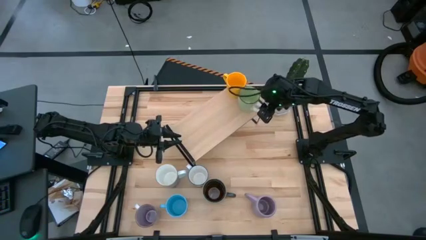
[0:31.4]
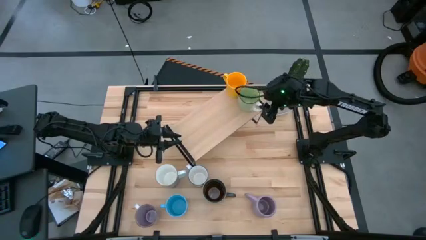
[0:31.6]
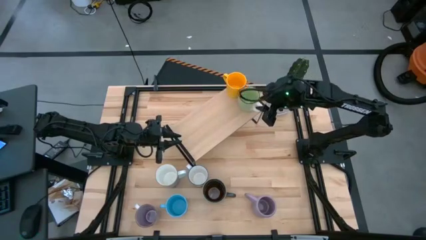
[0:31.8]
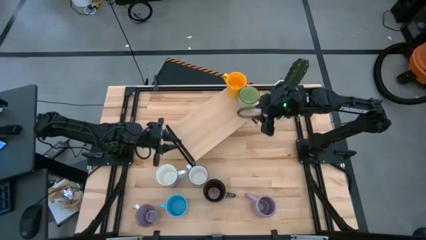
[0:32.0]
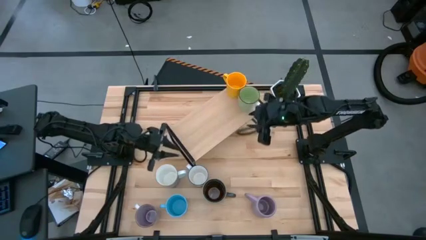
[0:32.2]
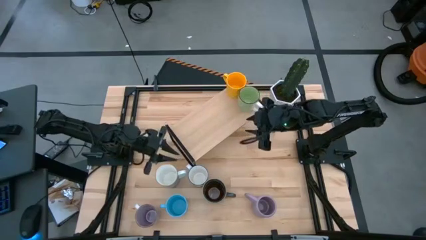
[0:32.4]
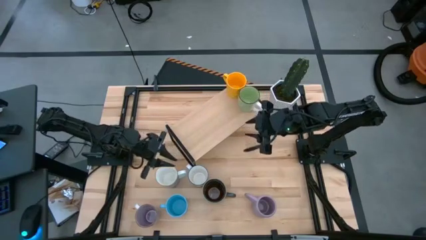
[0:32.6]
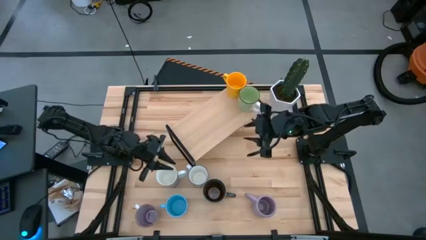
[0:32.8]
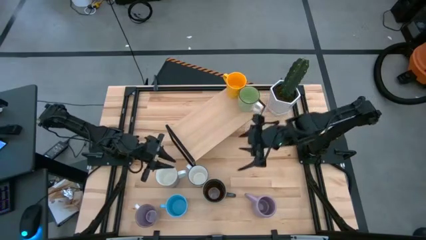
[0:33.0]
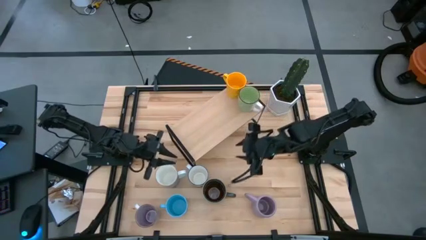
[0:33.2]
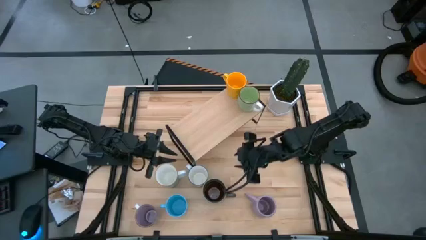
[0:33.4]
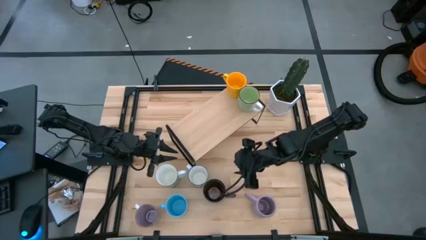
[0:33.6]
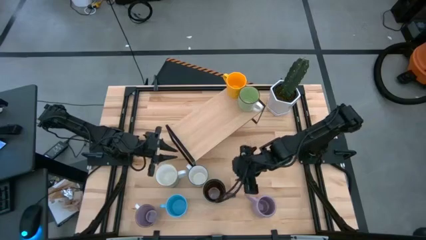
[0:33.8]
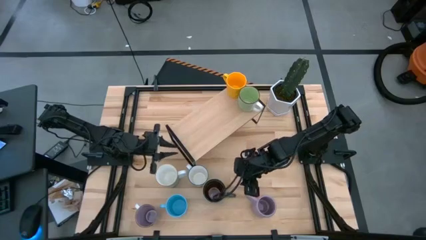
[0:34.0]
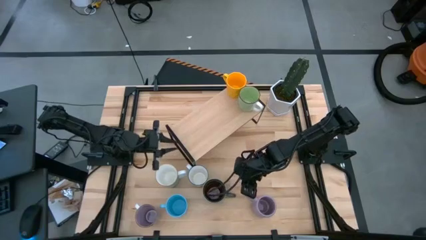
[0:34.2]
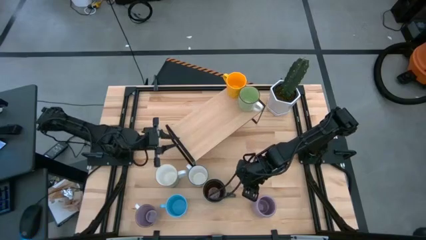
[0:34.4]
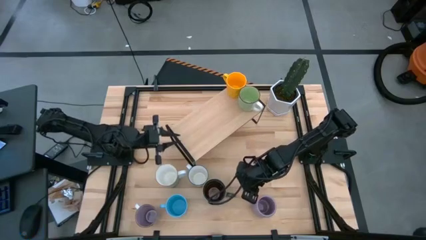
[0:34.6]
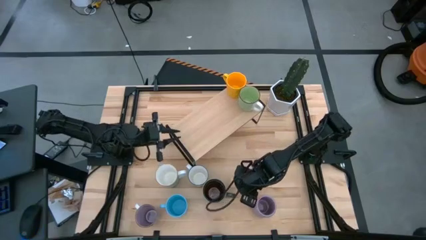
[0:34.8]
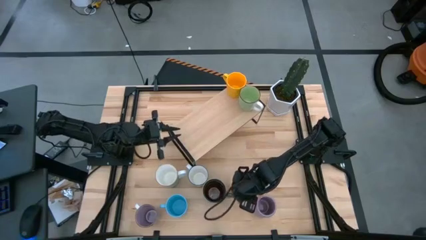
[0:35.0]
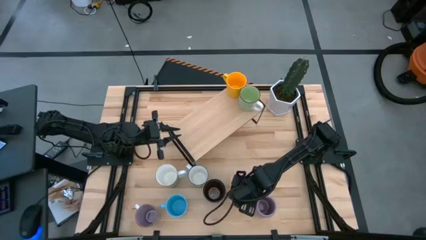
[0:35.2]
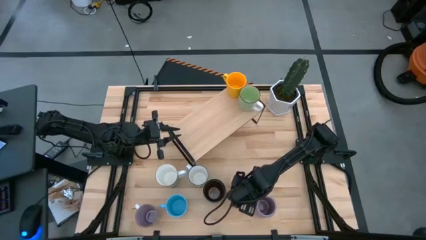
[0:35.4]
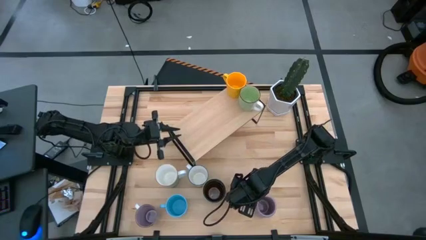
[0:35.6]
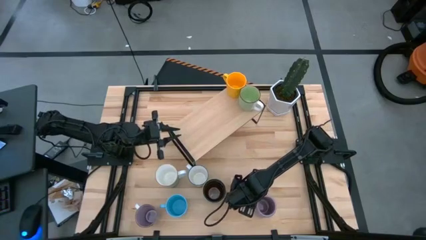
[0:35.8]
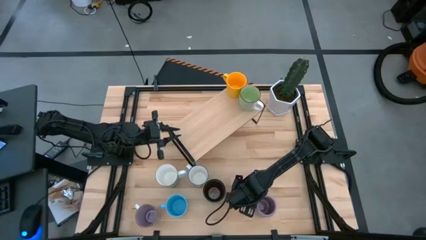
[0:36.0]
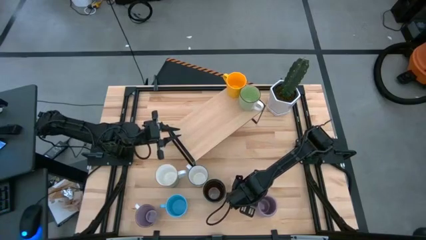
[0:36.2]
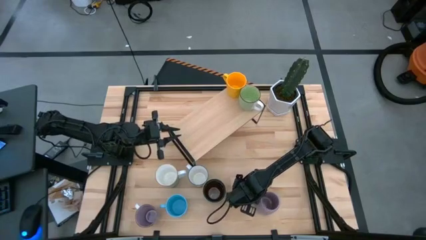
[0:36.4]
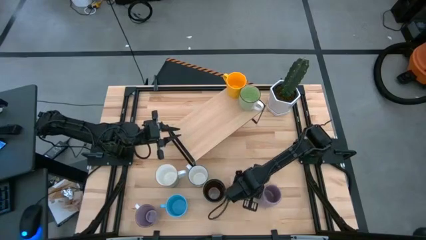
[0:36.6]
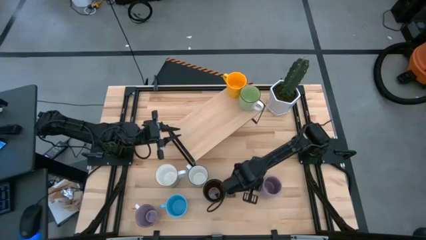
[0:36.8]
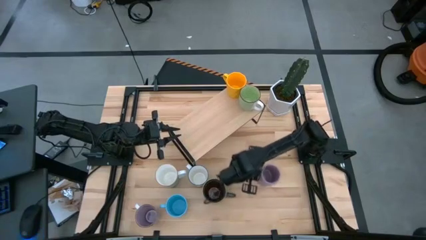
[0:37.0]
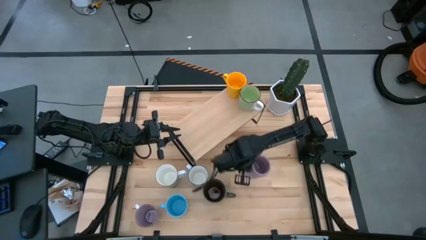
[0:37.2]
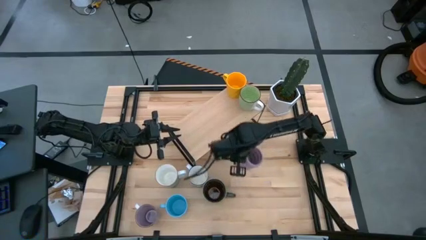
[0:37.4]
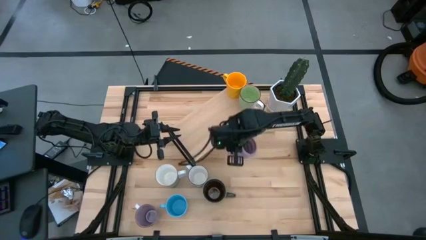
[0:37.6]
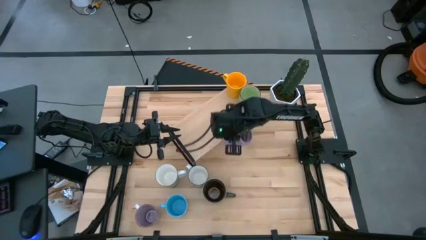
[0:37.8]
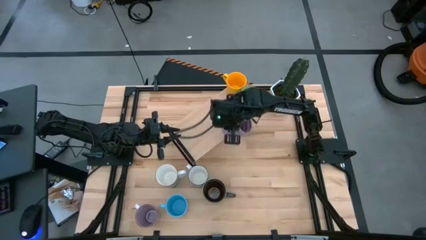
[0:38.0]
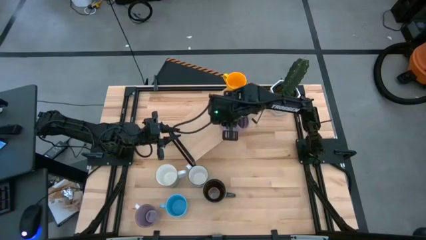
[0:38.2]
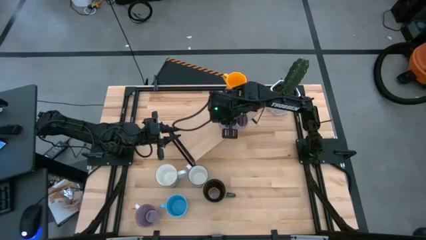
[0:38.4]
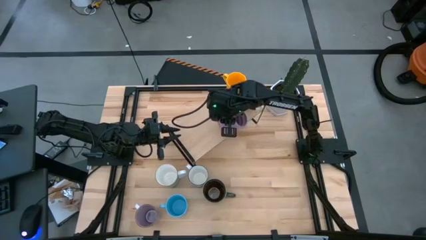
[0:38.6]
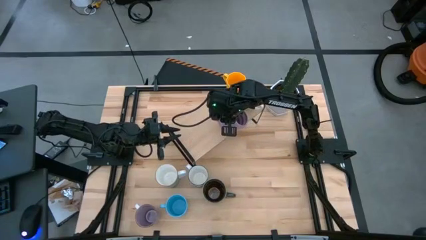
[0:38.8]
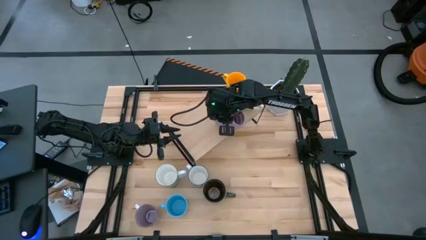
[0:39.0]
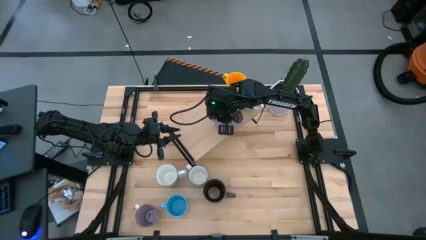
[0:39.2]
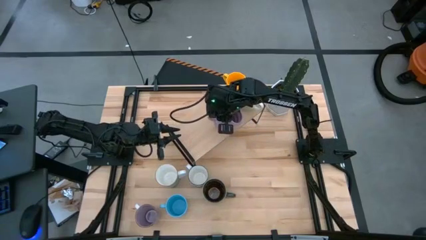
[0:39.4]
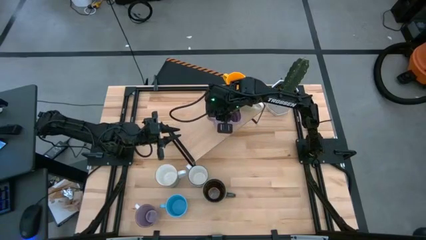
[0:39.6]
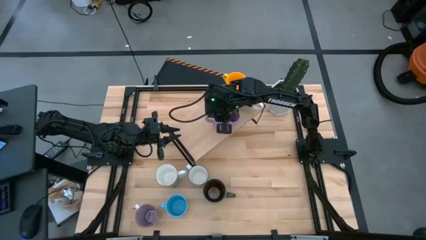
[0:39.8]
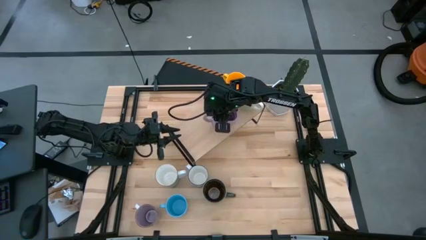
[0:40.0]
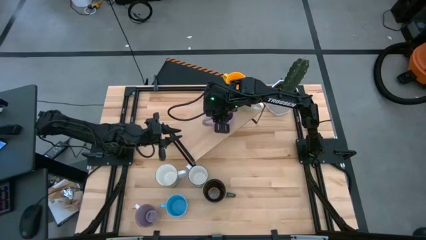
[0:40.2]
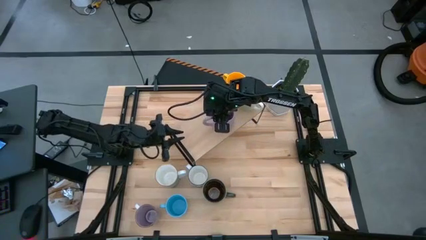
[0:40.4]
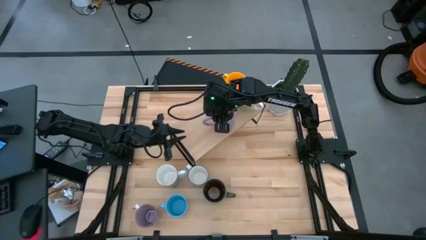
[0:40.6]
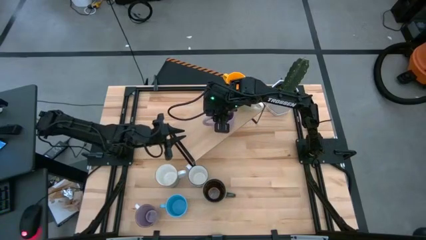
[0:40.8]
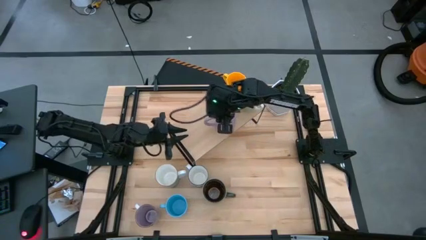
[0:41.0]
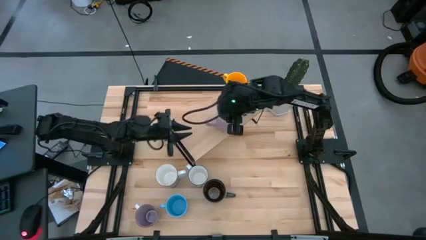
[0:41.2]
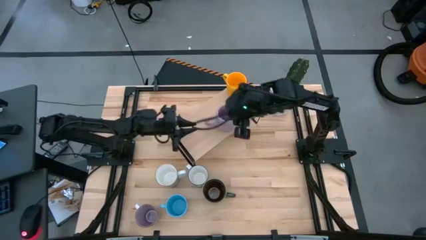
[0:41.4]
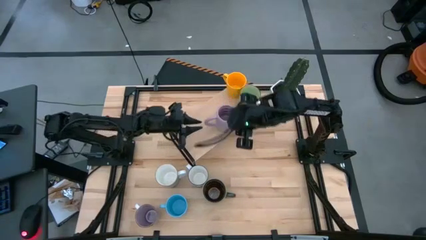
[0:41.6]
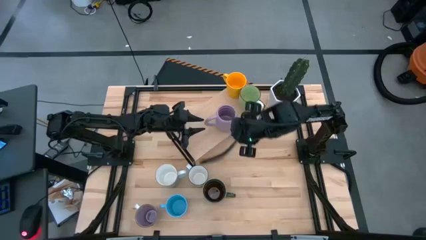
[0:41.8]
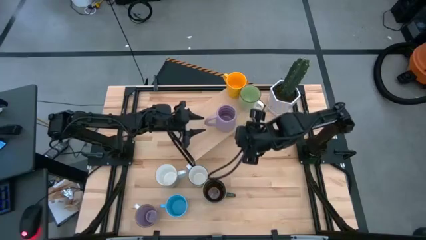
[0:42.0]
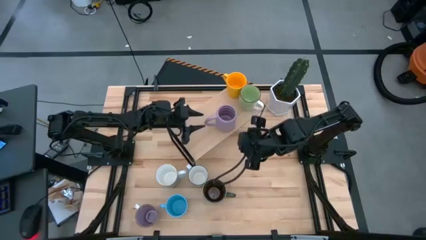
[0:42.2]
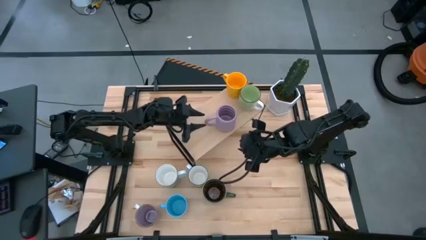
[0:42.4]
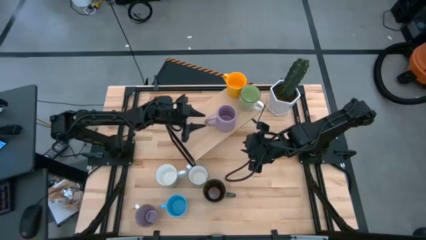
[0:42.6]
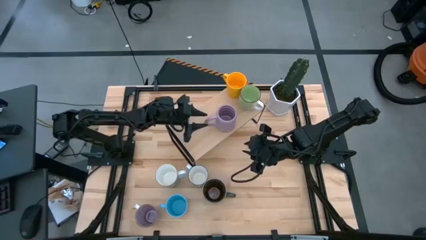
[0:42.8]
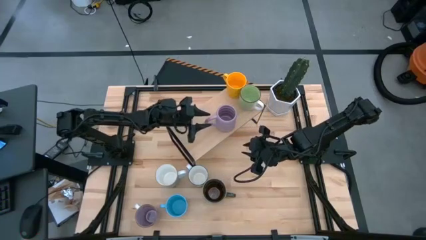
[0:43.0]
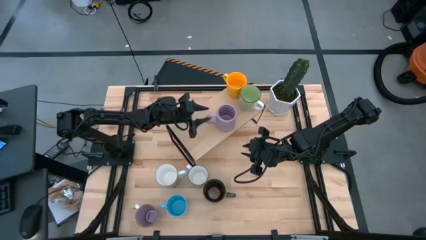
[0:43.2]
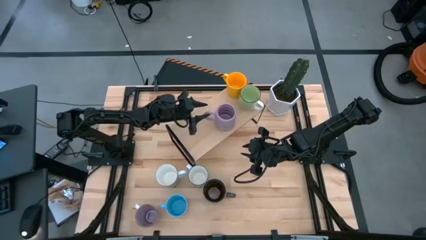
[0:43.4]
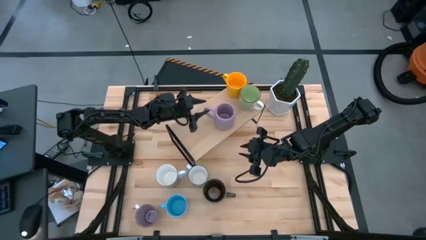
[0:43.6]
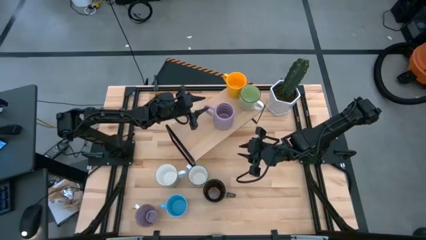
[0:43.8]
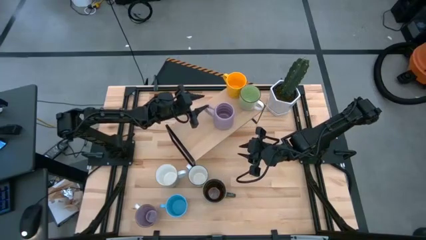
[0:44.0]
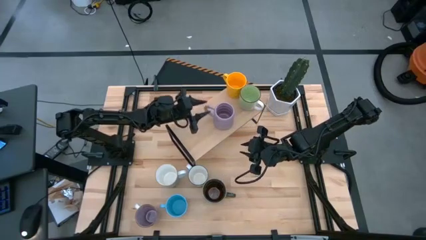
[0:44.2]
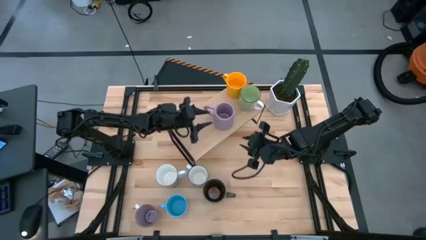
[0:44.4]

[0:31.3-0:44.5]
Task: Place coffee mugs
Put the right purple mug on the shelf

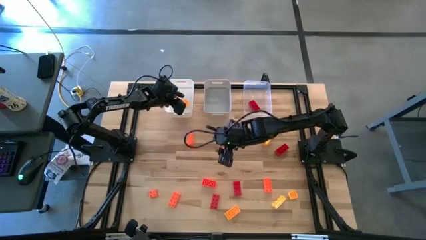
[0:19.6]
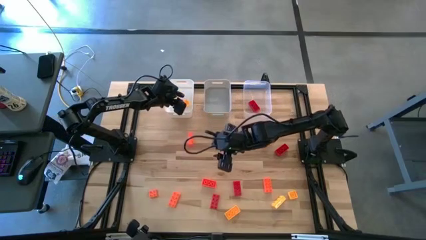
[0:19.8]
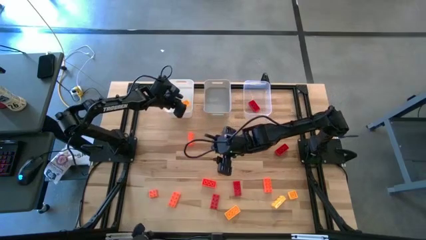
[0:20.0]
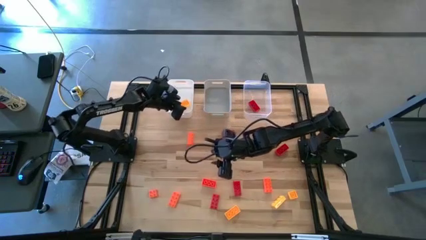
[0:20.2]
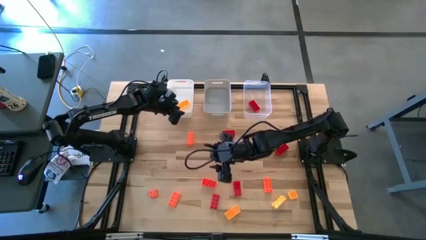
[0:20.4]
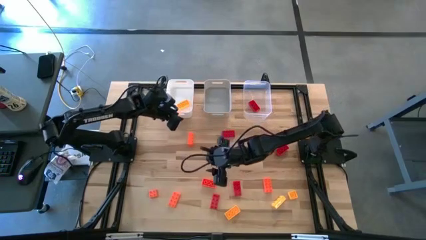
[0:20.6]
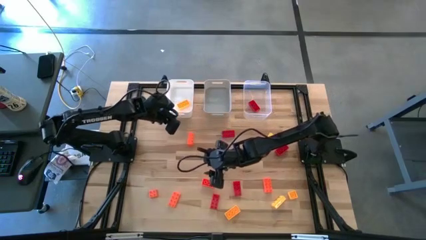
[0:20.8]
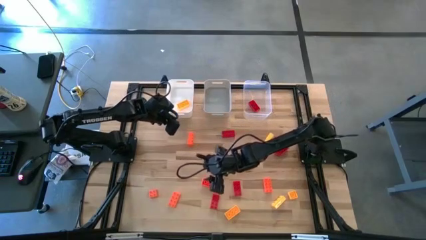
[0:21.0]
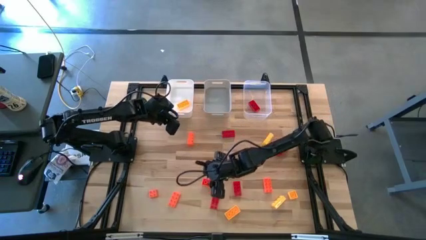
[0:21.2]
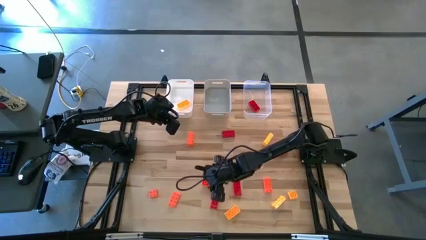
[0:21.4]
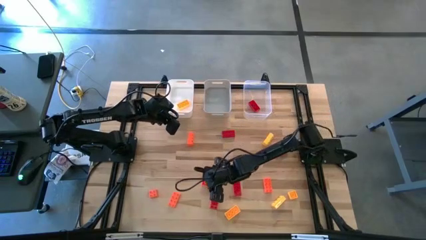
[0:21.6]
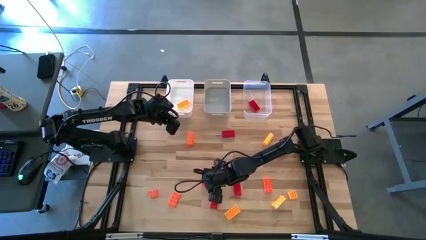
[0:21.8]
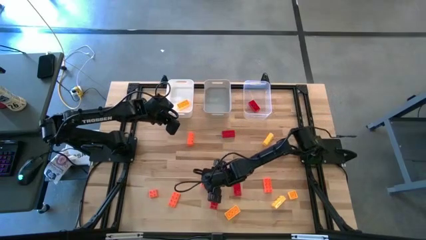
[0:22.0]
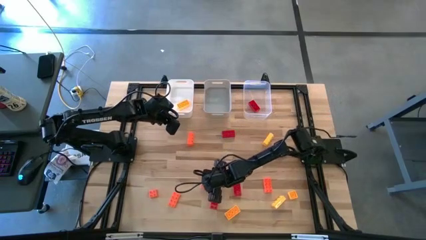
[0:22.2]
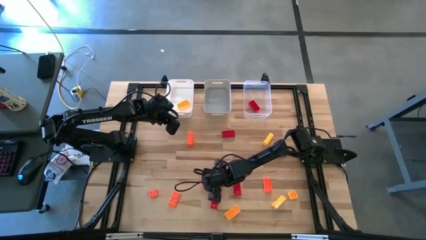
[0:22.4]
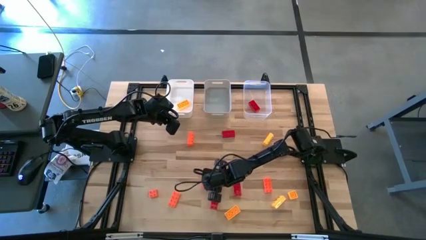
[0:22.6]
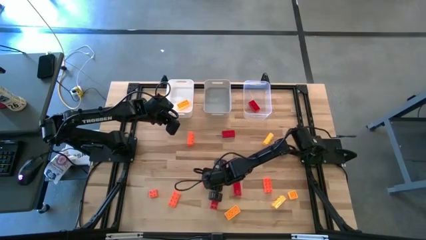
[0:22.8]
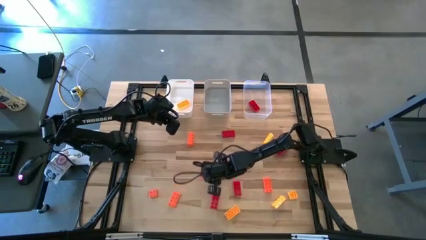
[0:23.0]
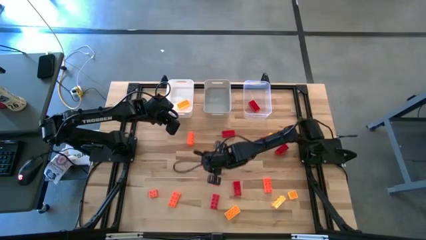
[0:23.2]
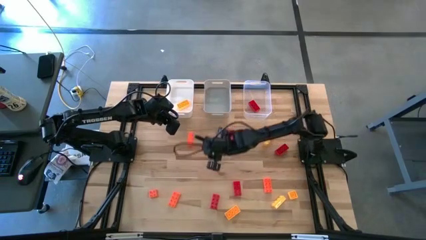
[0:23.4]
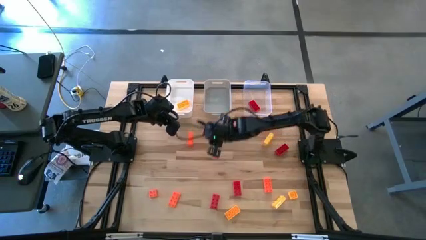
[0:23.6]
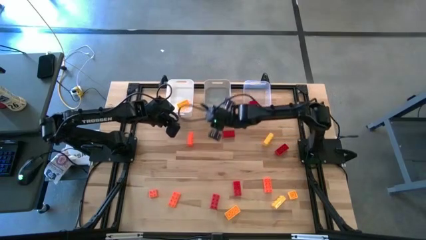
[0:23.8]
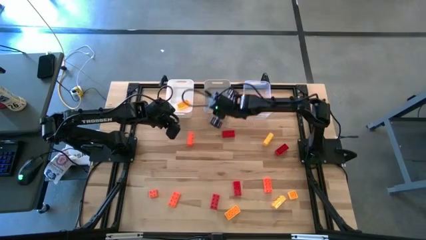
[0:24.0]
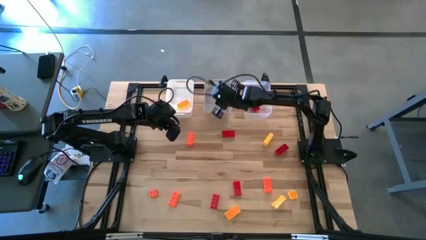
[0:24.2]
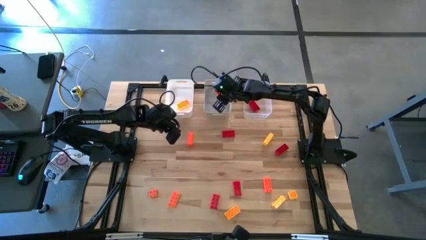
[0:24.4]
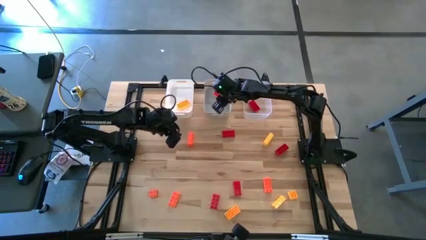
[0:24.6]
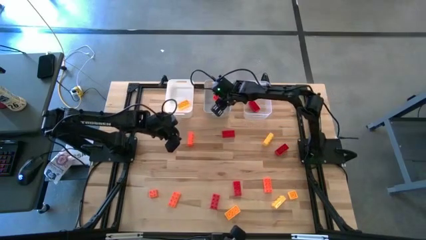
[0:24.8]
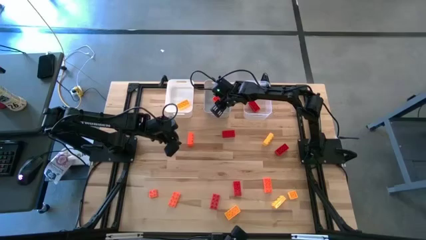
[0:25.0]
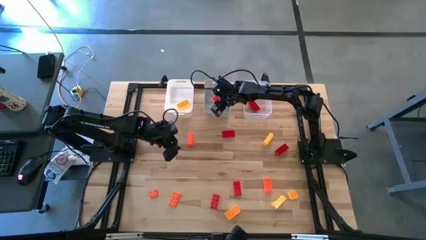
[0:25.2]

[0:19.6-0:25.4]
Task: Sort & place blocks by color
Put the orange game piece into the gray bin
